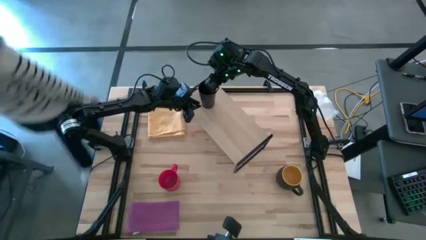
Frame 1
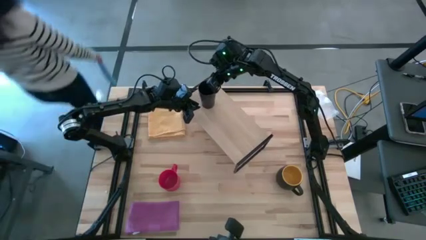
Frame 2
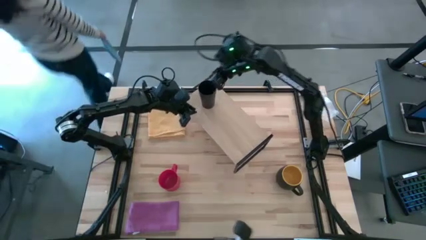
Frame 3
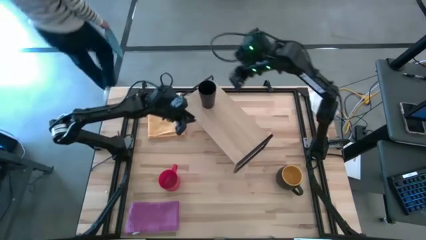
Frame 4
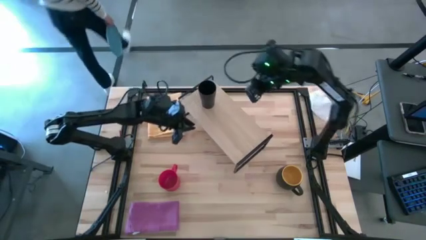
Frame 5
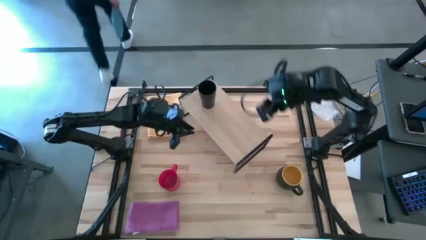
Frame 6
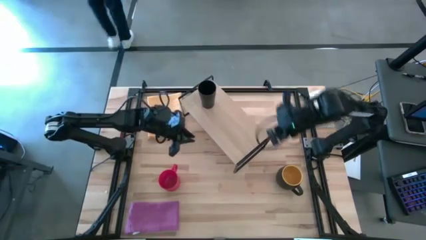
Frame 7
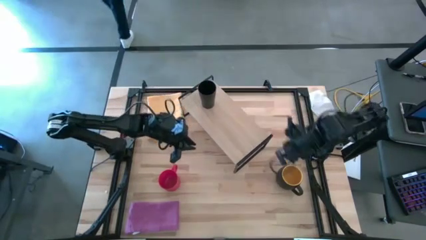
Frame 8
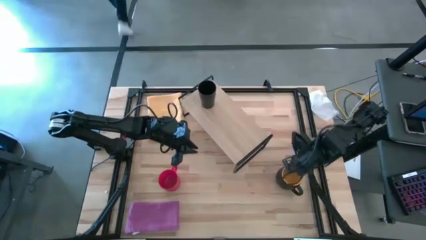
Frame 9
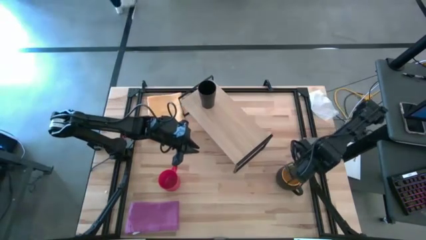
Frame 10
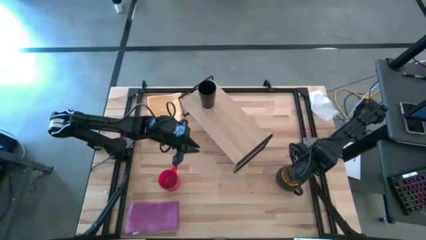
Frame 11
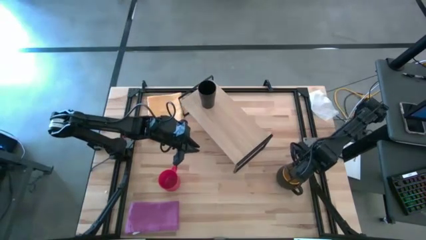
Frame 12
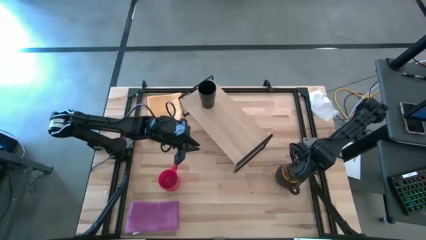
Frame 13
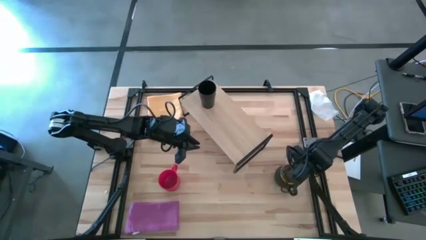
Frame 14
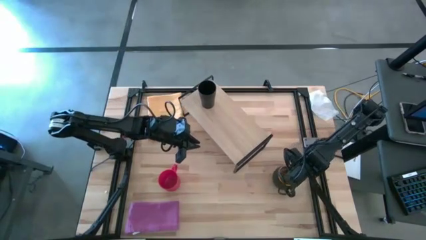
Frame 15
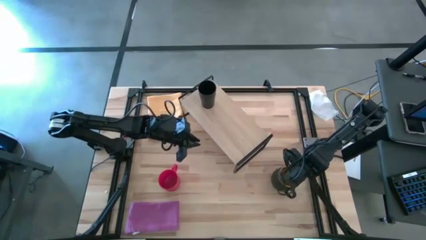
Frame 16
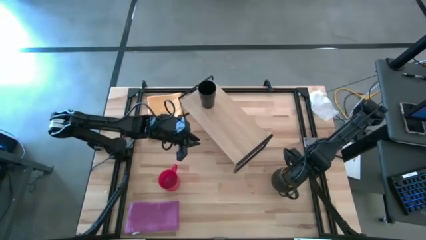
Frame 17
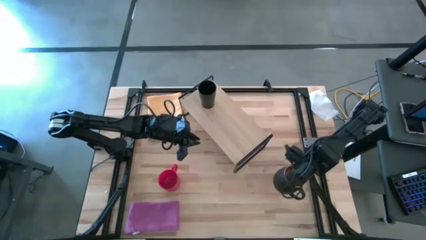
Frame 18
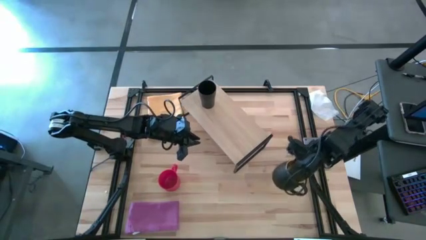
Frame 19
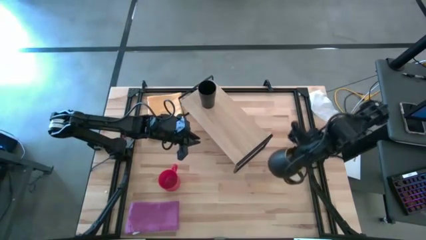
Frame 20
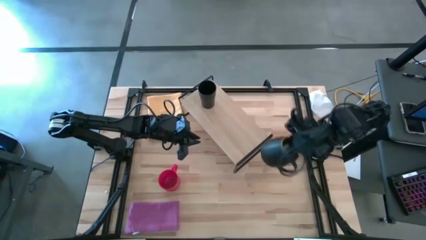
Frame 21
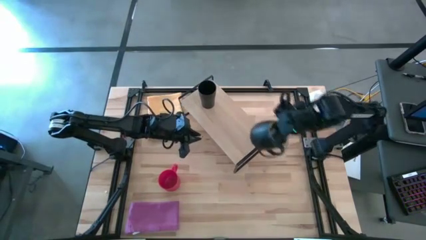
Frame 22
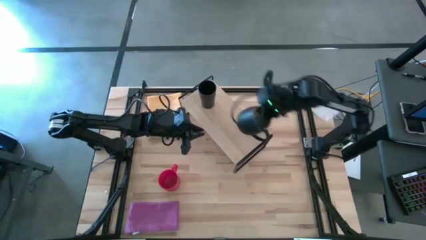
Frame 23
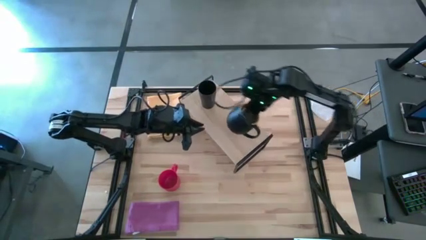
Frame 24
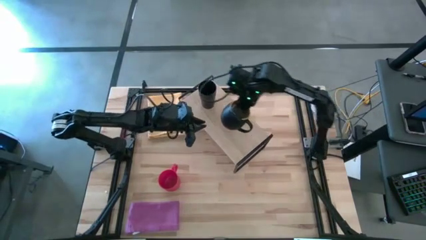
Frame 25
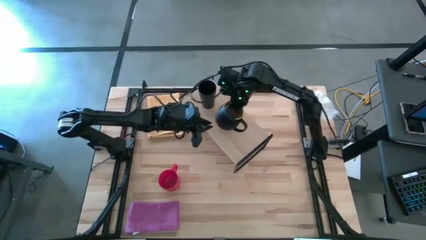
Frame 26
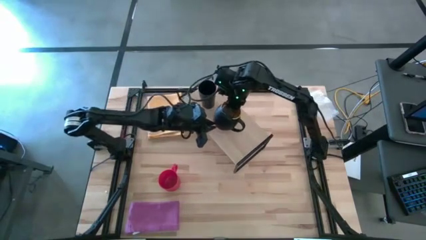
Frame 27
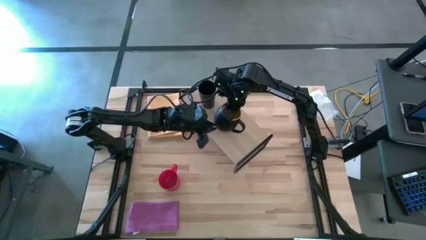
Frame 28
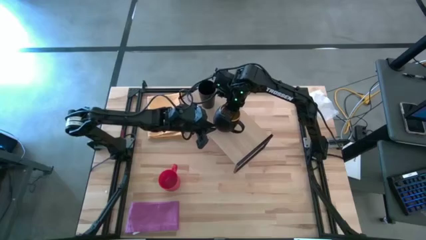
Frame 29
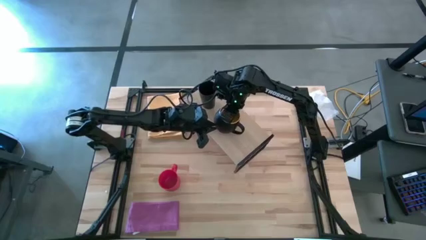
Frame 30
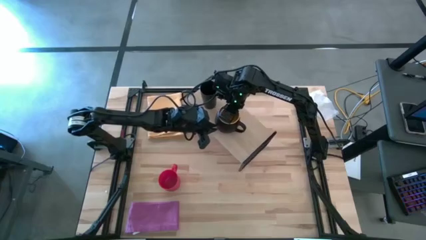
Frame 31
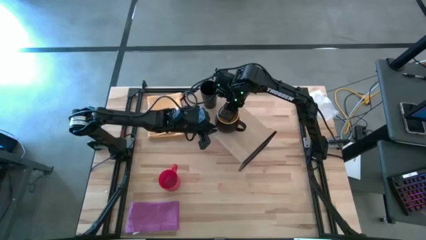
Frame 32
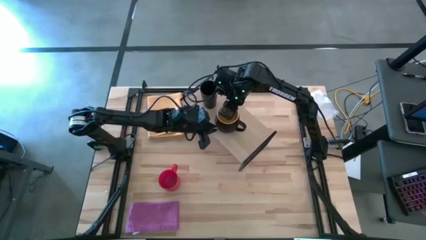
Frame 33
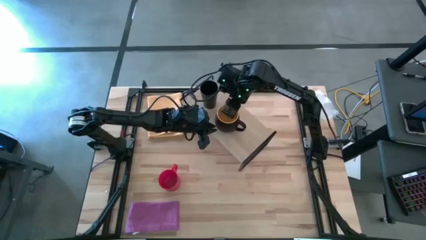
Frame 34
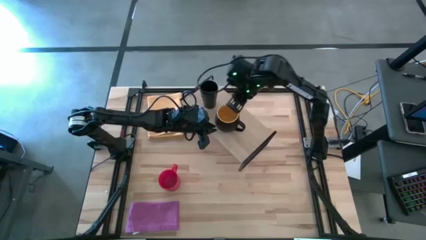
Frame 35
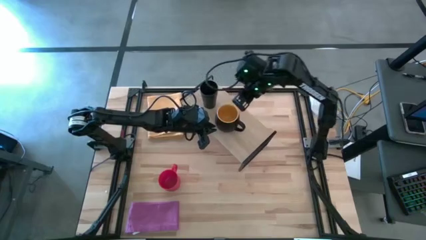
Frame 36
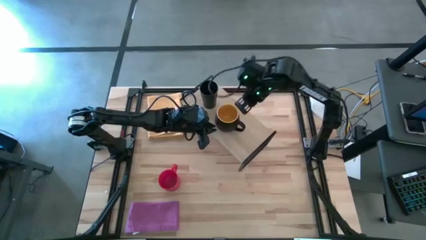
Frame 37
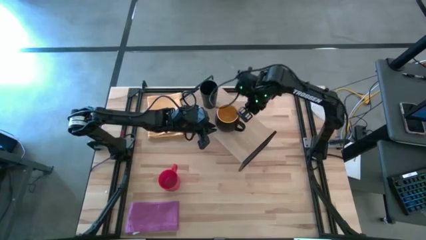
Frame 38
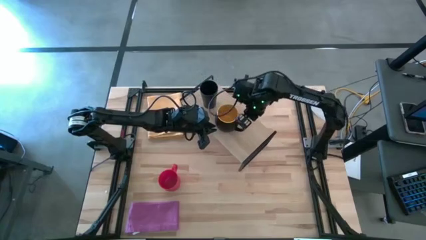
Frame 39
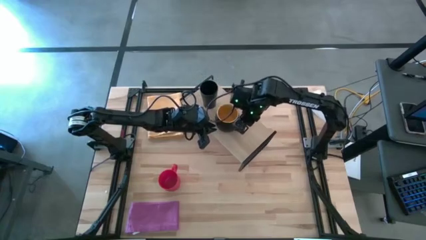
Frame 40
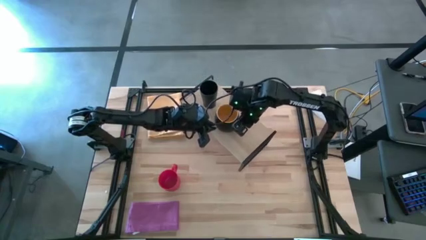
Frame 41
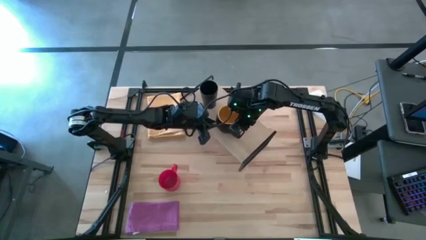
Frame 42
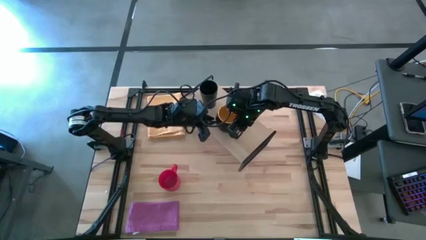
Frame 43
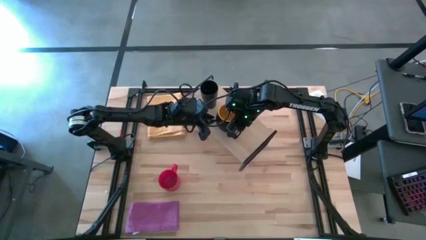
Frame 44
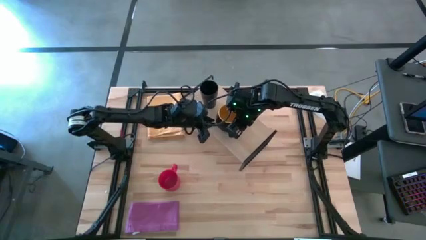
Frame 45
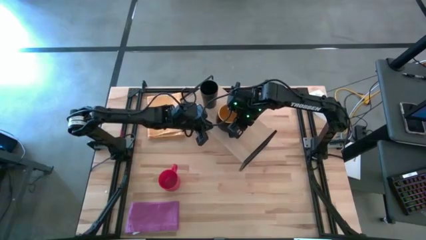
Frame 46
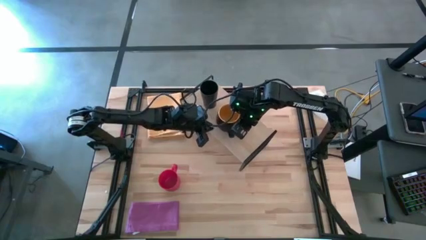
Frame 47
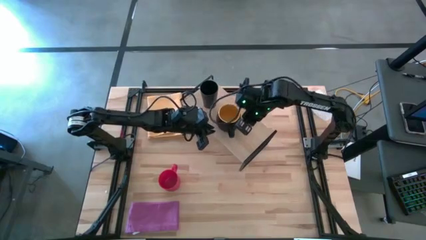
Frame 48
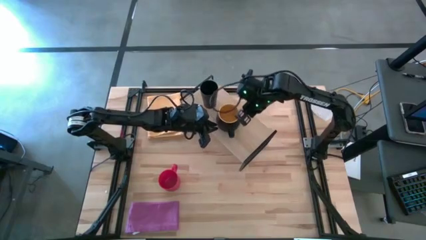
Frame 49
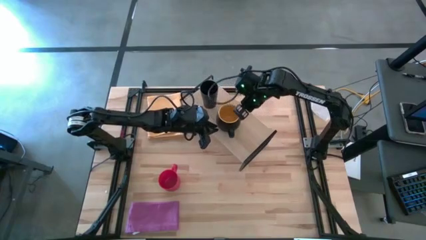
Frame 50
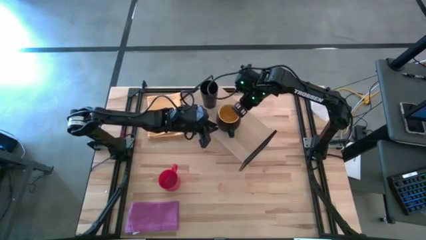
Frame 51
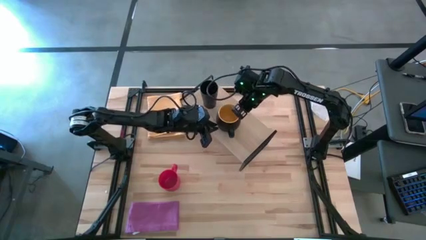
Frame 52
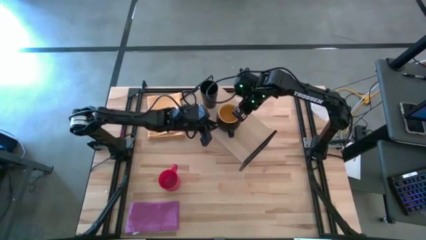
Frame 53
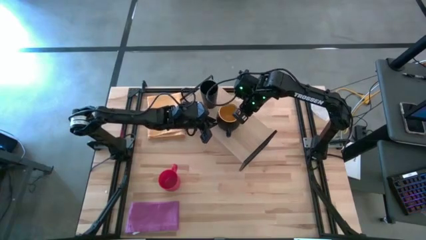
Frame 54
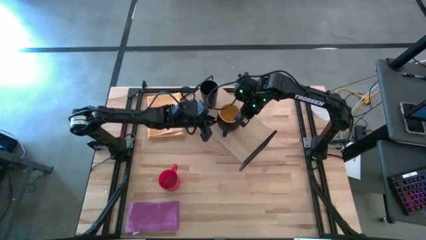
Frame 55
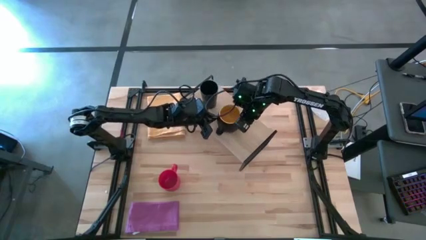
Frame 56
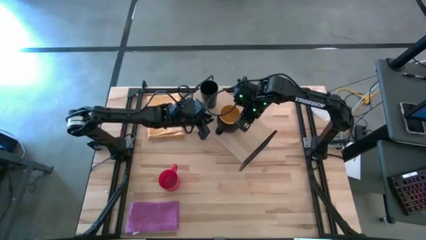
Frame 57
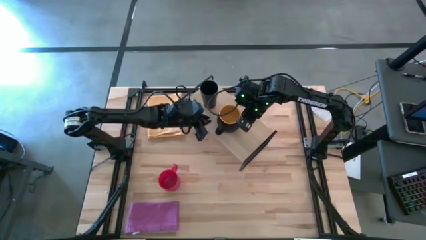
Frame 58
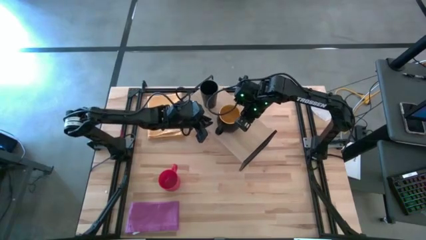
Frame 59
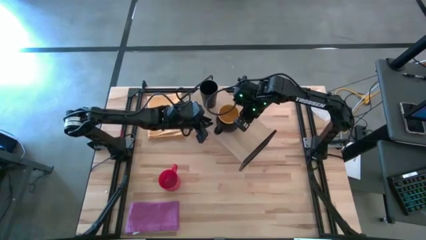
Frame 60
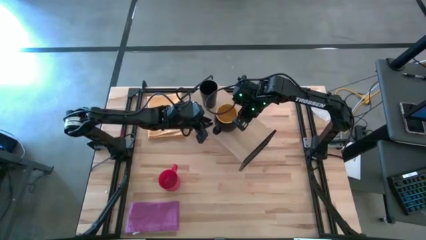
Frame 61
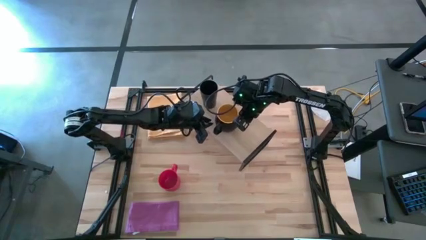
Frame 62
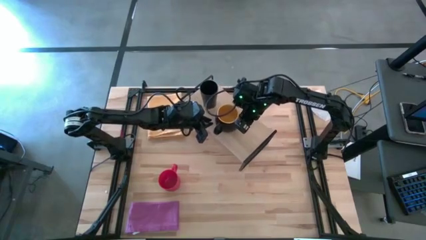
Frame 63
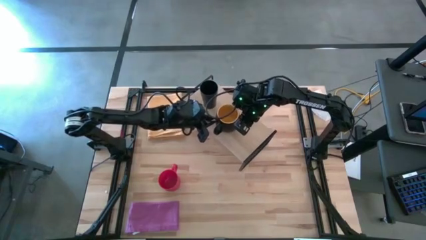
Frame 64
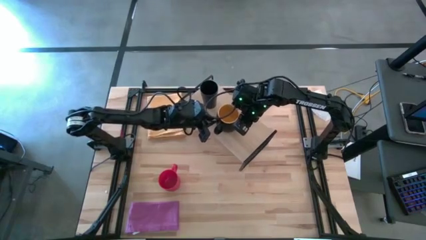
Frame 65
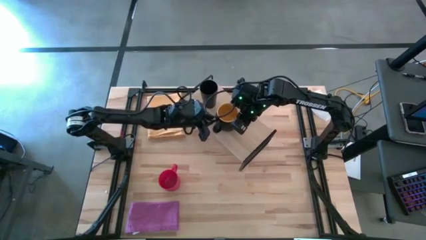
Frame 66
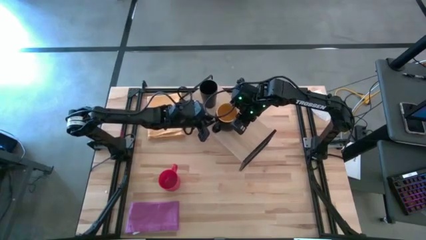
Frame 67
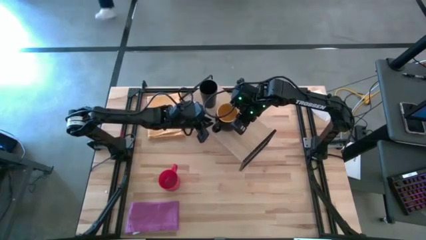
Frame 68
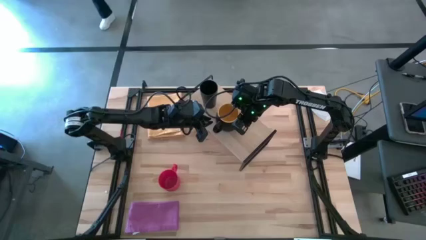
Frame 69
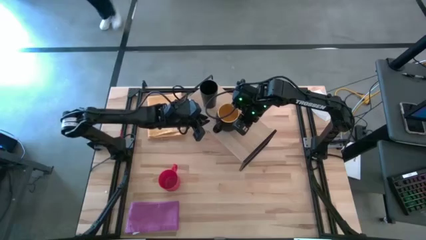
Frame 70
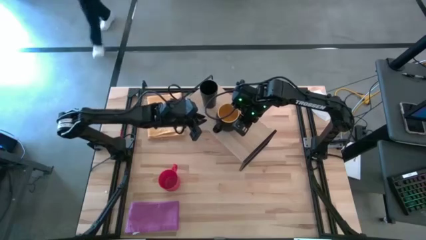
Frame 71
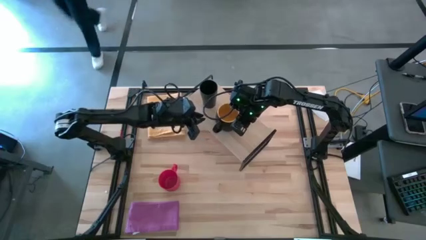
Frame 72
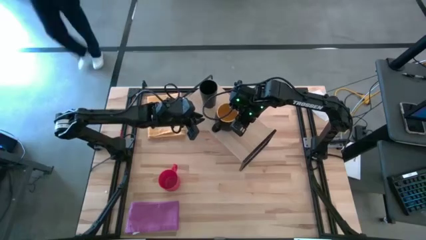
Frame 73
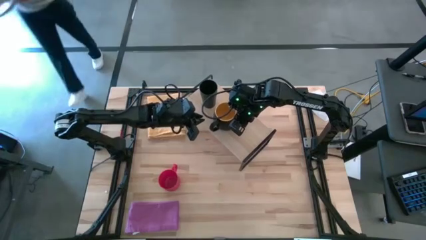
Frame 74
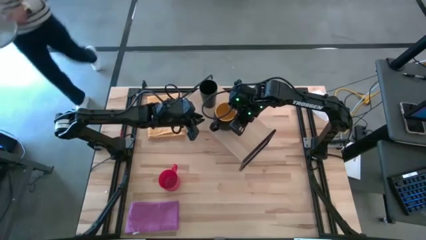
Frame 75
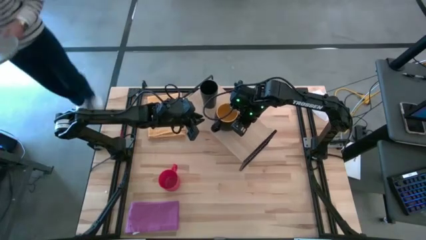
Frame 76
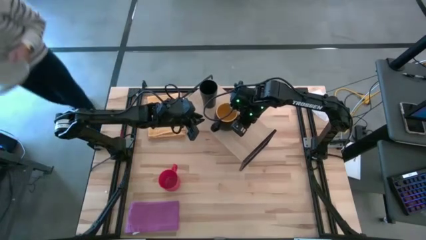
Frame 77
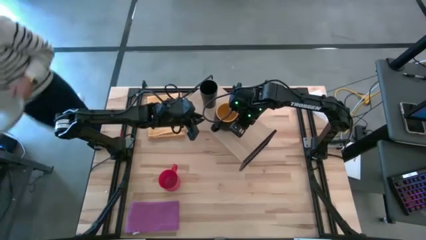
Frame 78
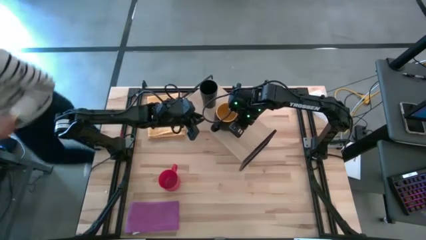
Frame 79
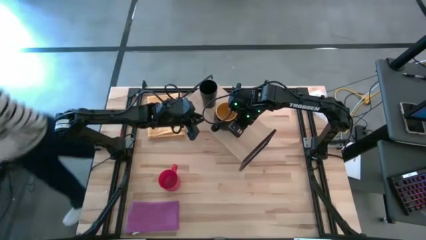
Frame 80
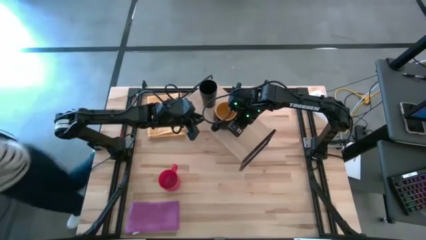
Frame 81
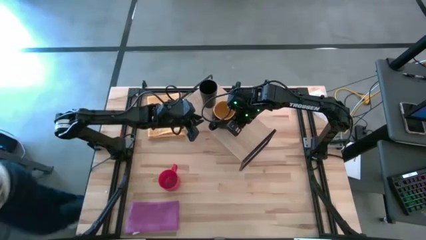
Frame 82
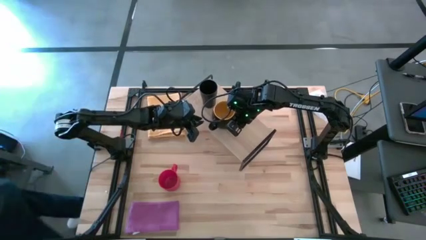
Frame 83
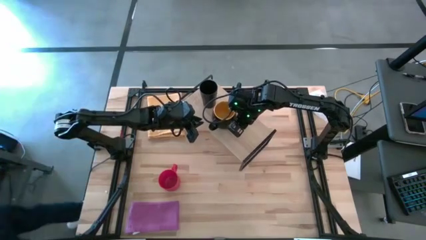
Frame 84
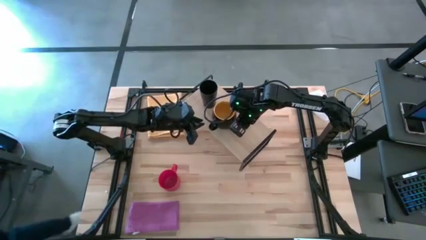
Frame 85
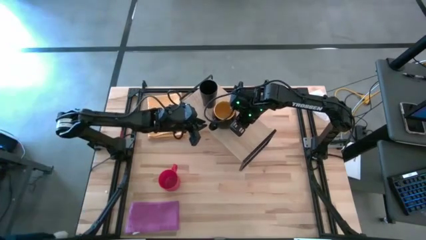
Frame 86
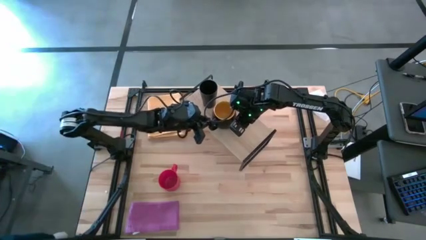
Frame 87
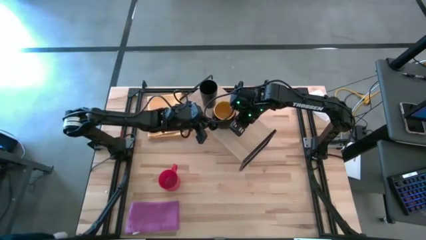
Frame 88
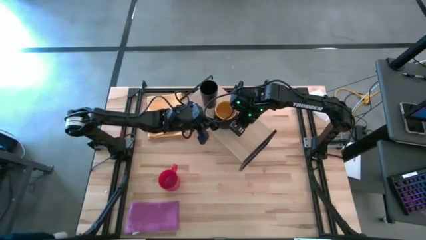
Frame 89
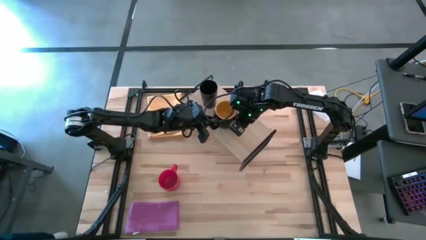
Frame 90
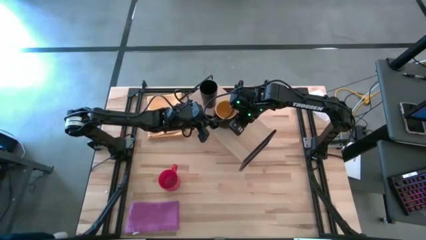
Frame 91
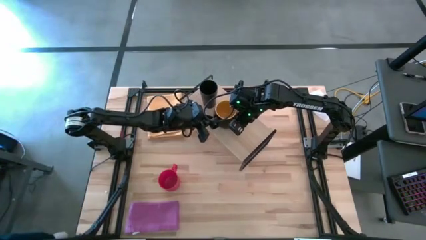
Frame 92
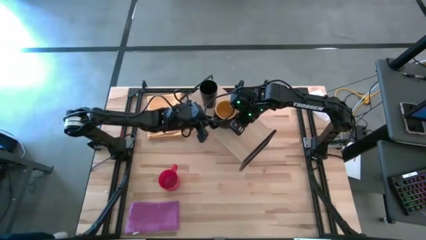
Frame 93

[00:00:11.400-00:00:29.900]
Task: Stack small to large cups/mugs on shelf
Put the black mug on the shelf
